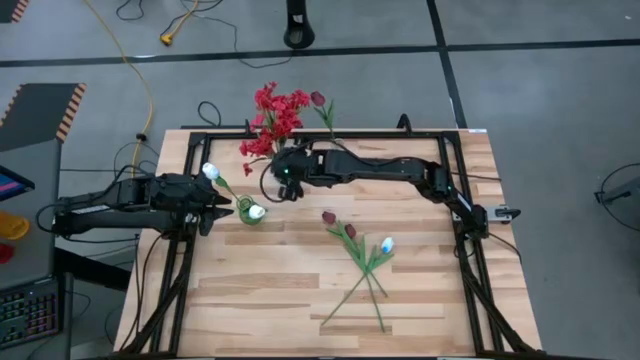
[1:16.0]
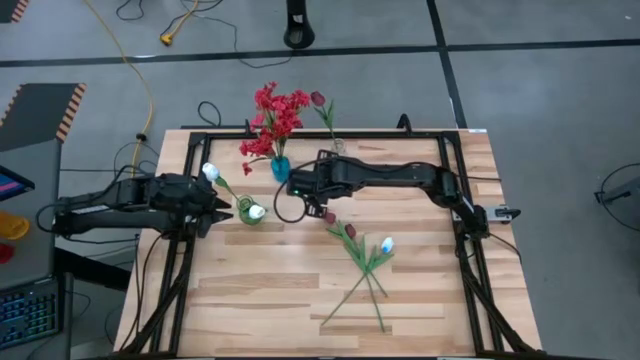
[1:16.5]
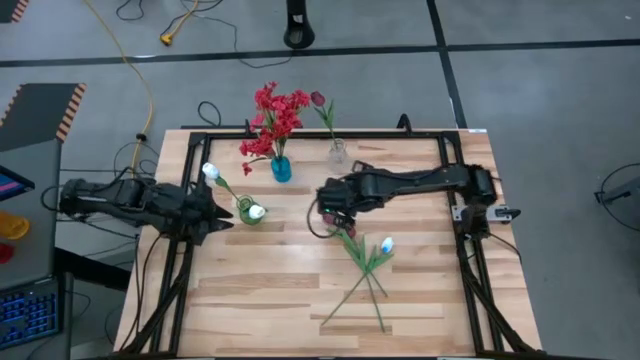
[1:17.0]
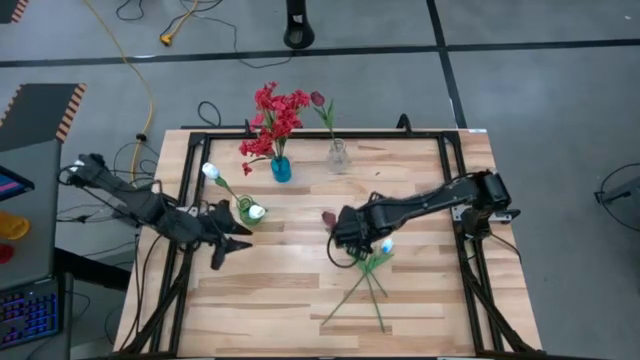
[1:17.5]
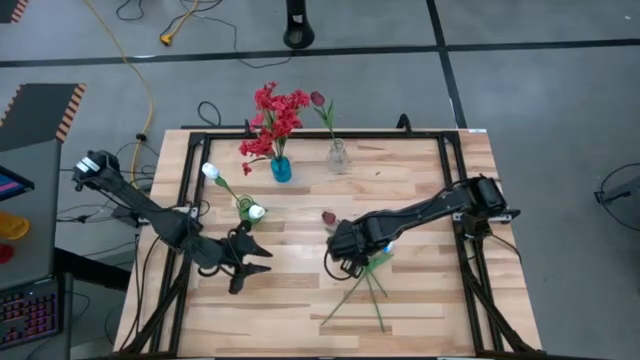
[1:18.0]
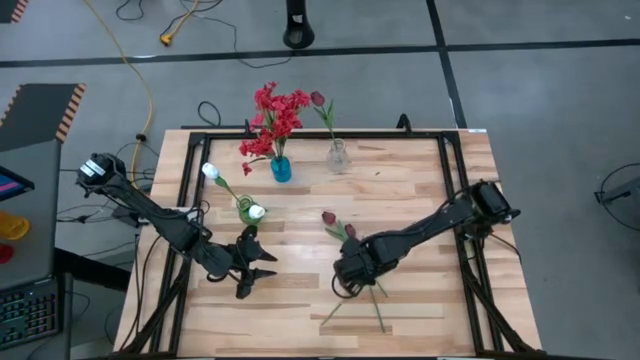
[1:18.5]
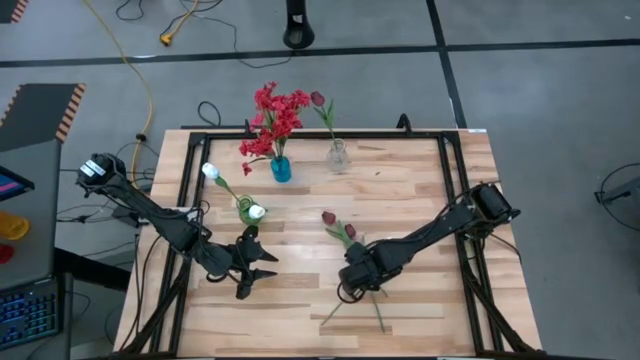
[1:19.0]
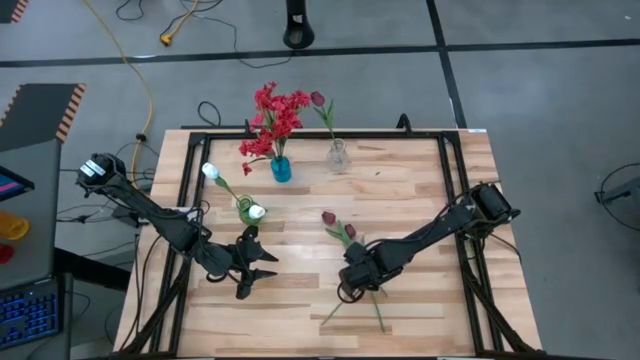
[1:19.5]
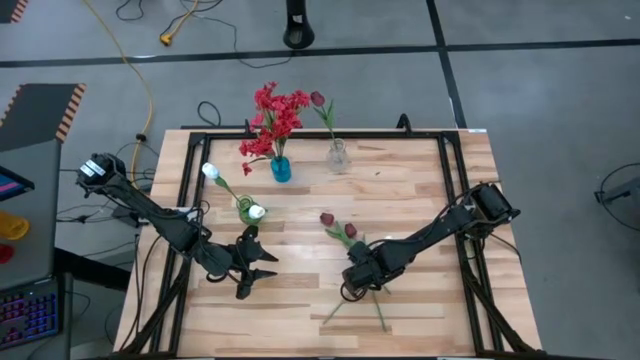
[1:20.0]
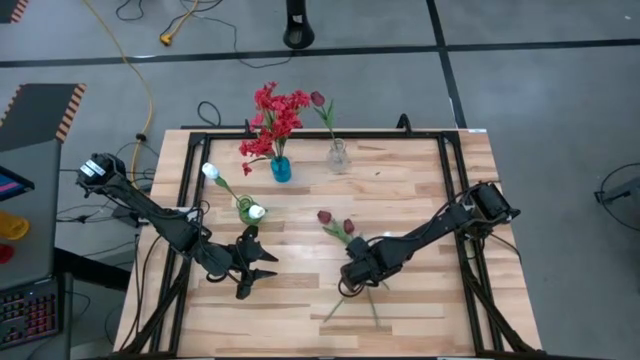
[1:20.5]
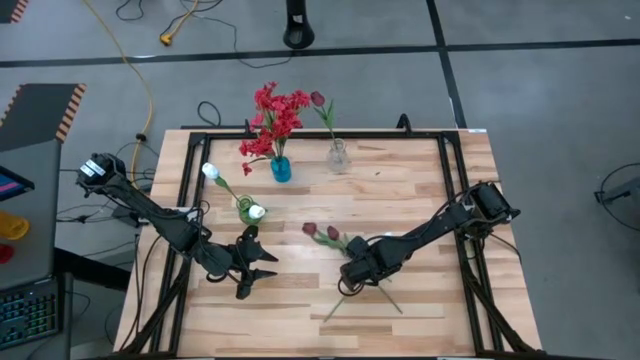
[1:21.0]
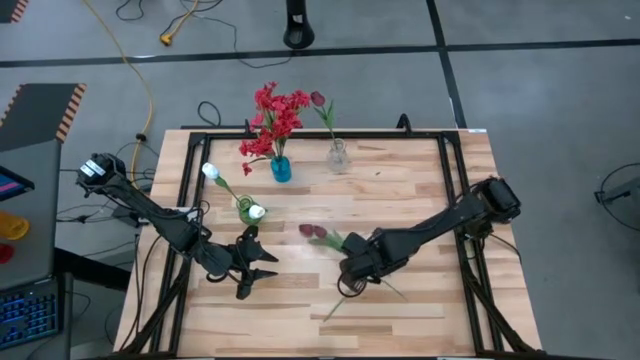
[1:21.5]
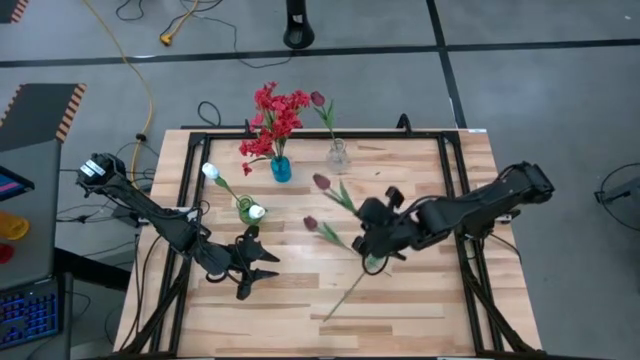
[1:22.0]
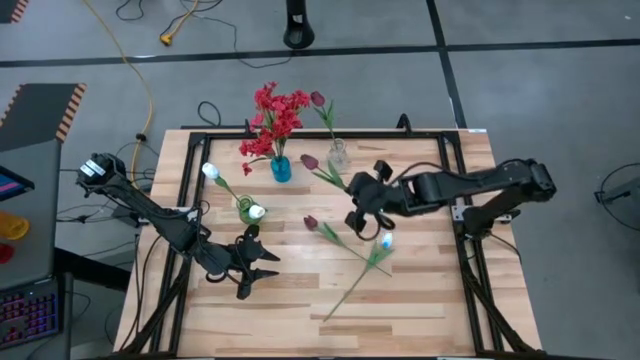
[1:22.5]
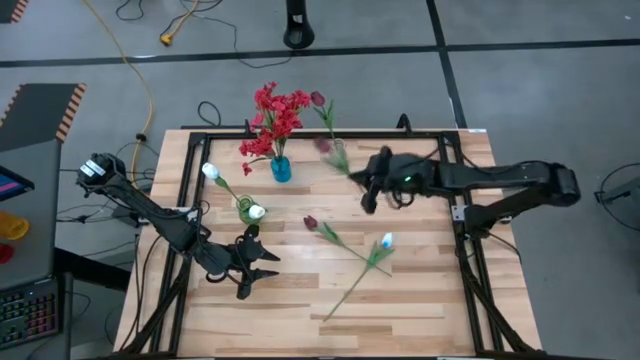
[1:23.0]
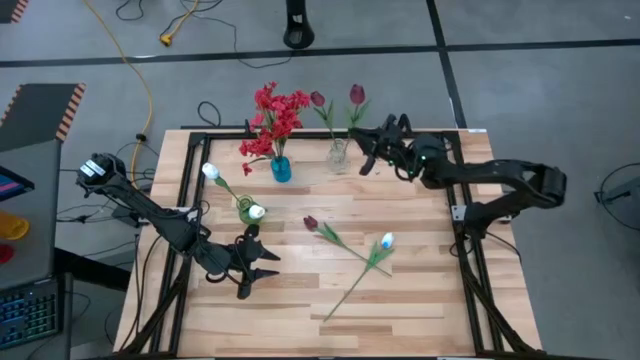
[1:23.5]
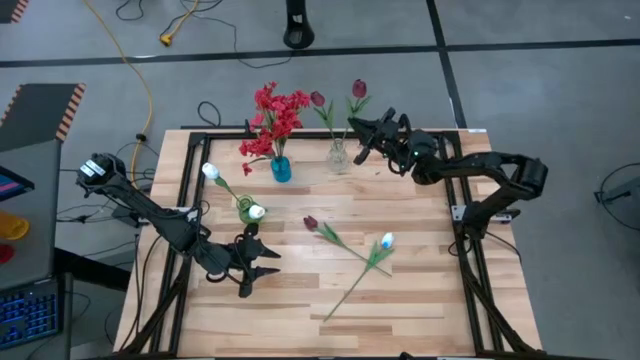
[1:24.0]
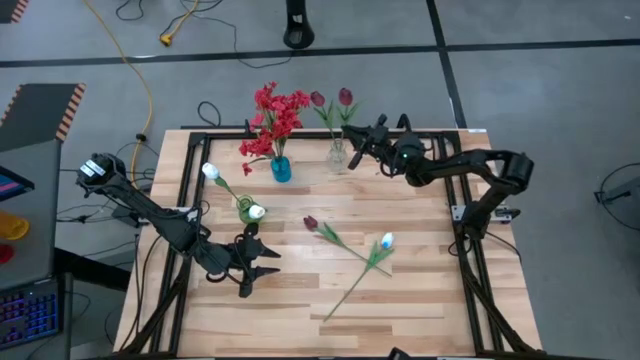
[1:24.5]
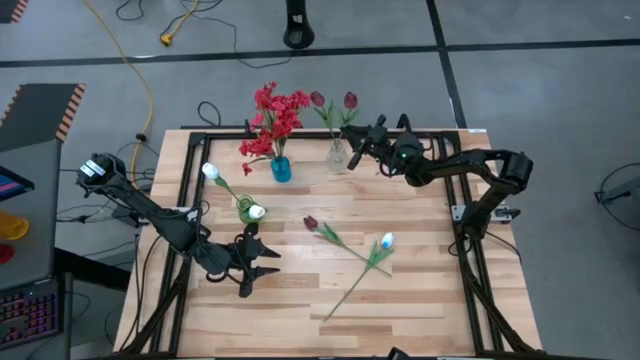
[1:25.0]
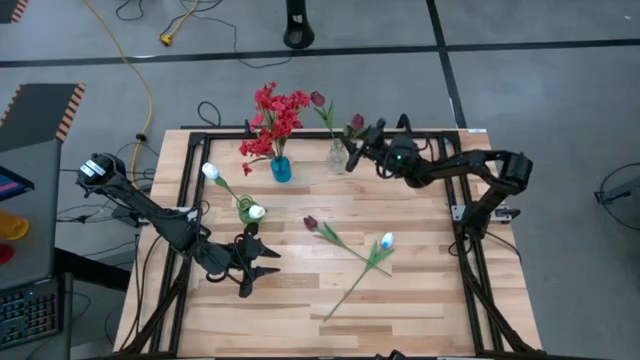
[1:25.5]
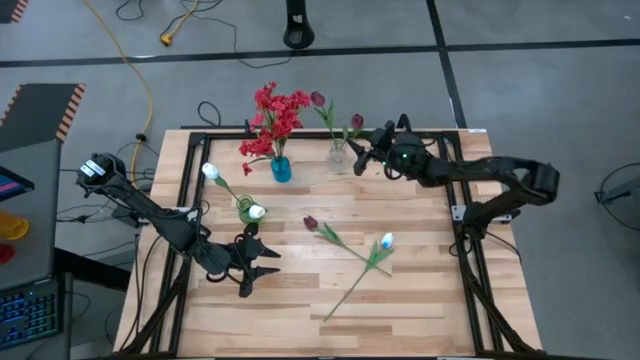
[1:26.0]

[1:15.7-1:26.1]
Task: Sort flowers into vase by color
Put the right red tulip into the transparent vase

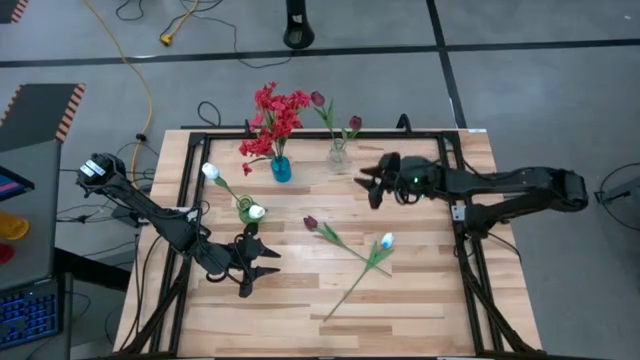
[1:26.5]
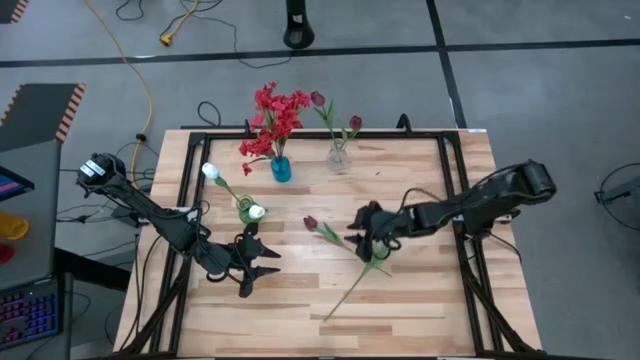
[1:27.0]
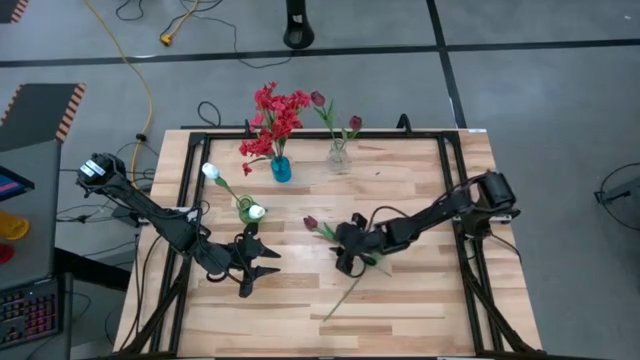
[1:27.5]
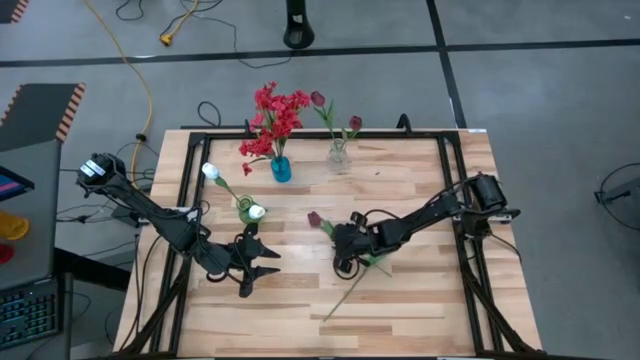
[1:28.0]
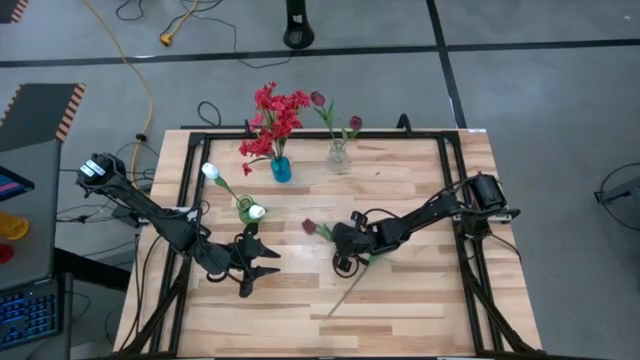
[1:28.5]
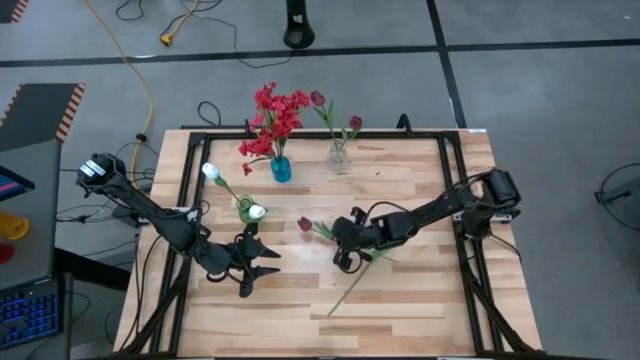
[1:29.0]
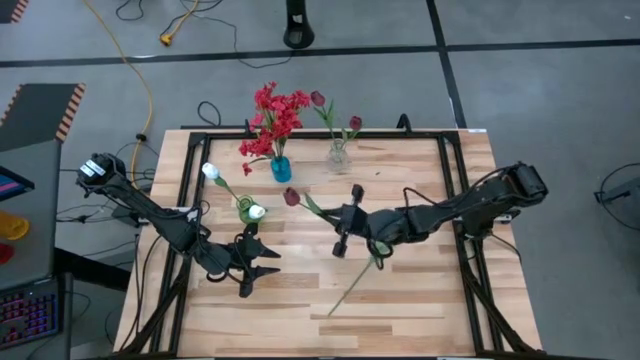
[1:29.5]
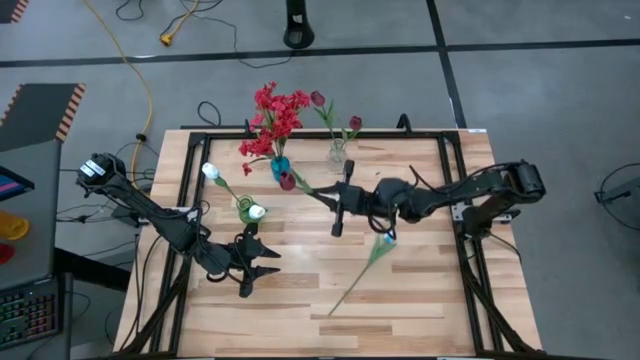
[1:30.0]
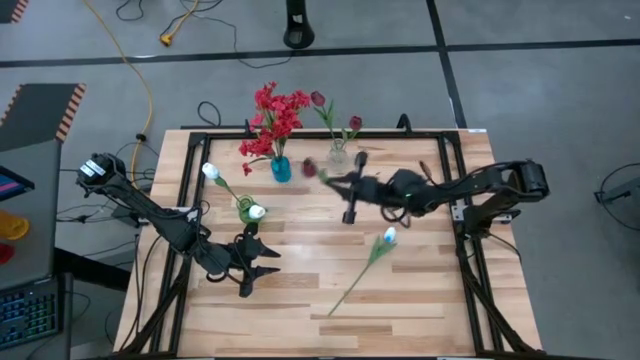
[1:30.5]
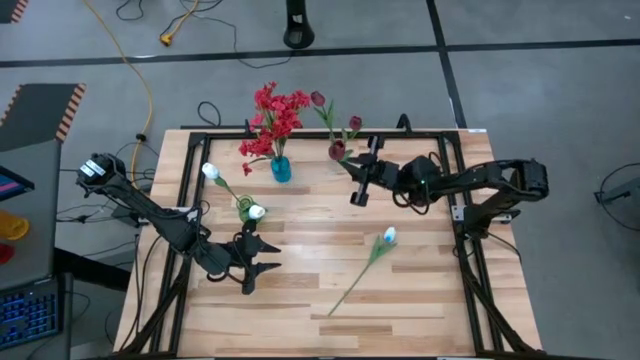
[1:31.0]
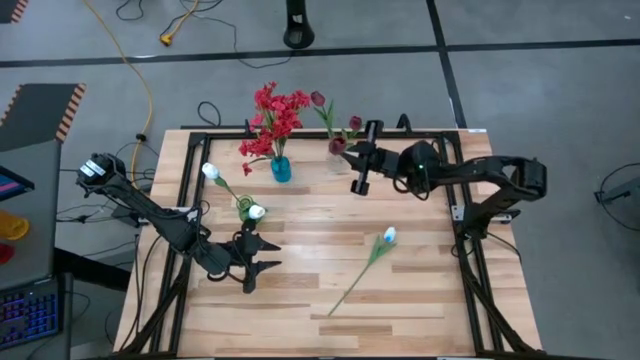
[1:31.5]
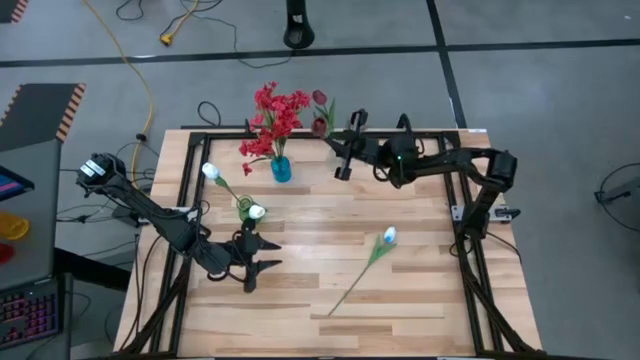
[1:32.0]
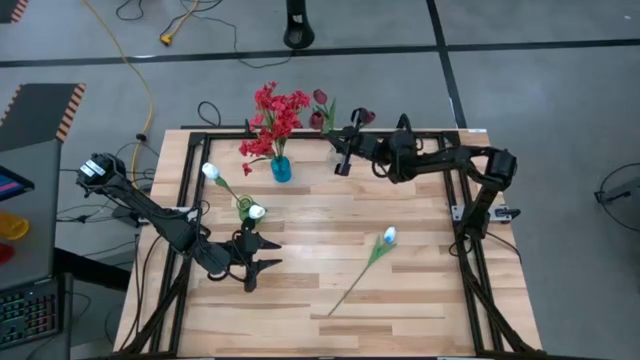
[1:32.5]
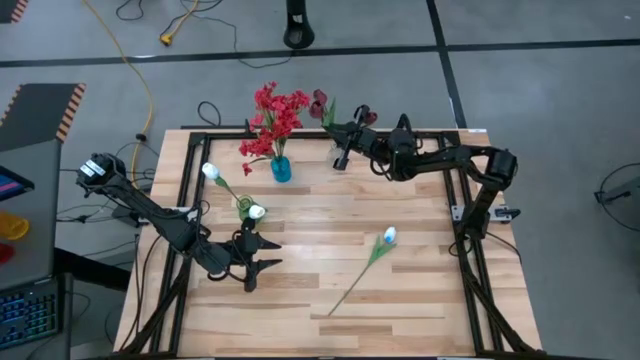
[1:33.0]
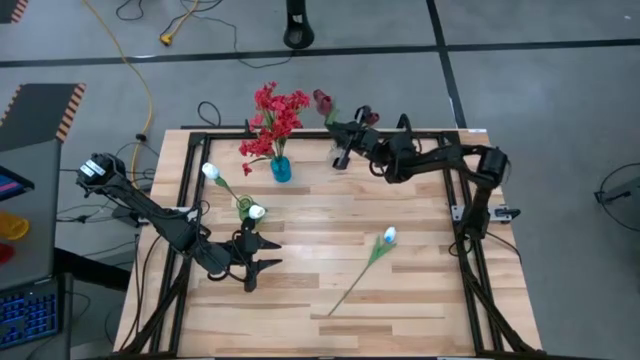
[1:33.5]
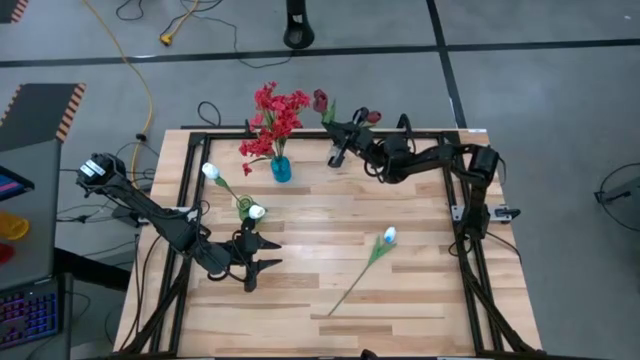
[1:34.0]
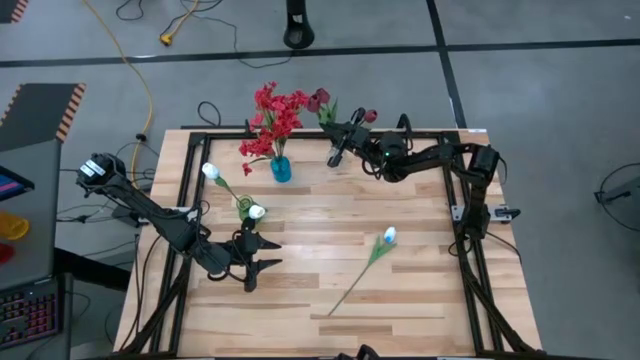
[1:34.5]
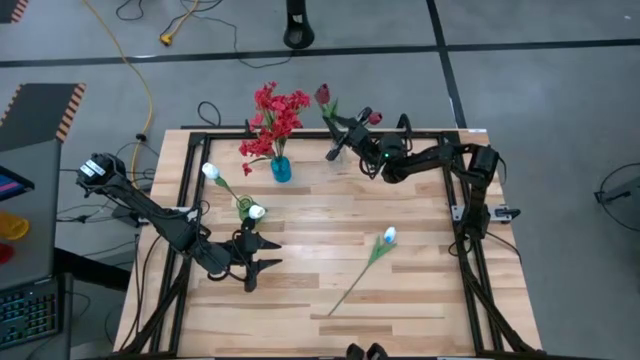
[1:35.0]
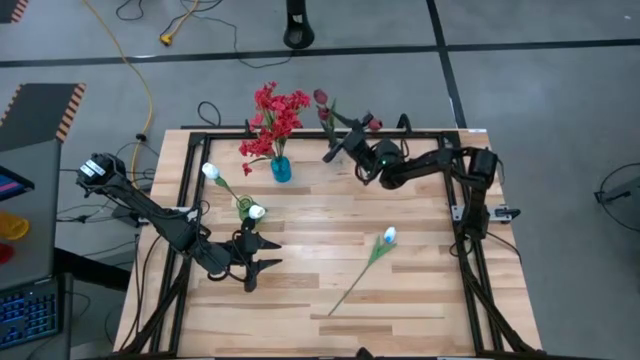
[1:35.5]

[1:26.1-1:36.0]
Put the red tulip into the transparent vase
